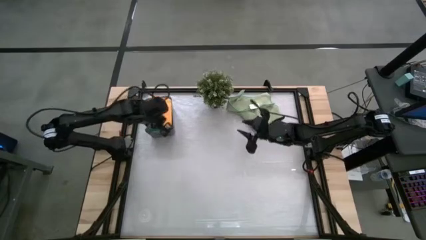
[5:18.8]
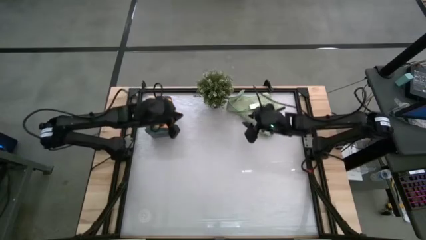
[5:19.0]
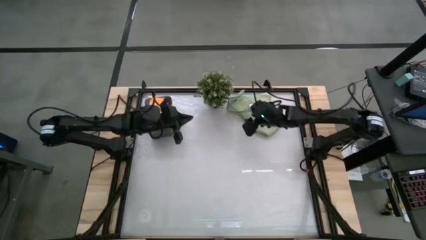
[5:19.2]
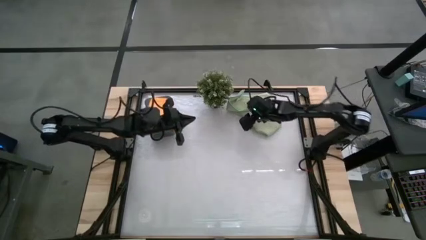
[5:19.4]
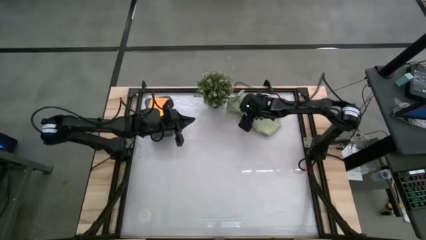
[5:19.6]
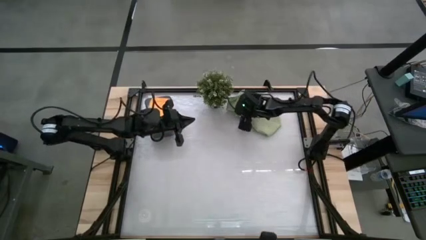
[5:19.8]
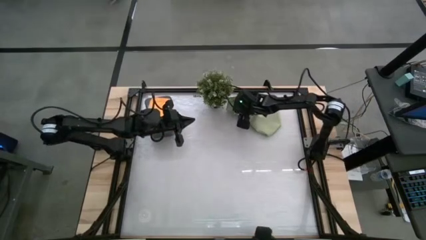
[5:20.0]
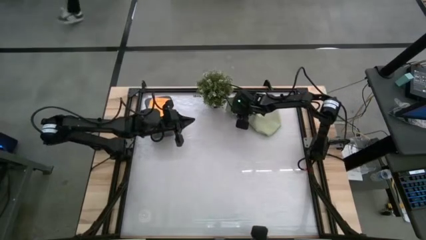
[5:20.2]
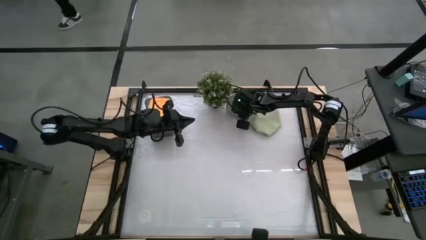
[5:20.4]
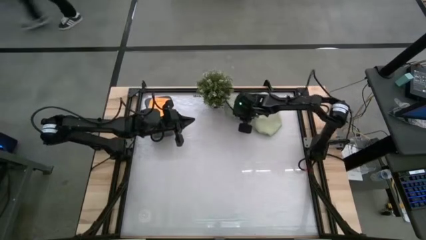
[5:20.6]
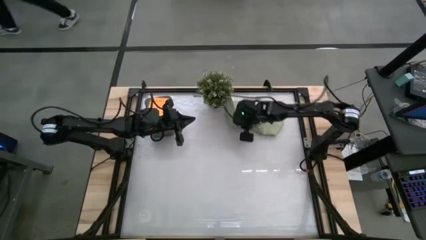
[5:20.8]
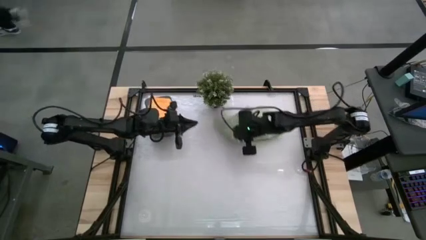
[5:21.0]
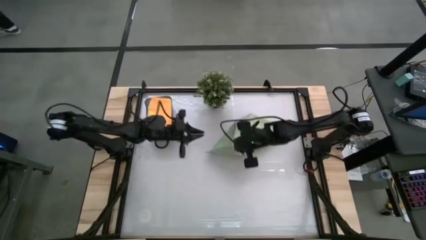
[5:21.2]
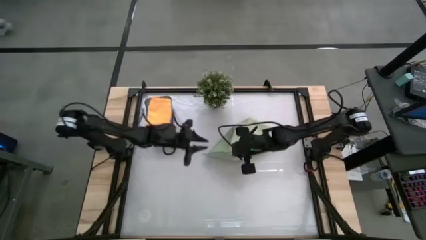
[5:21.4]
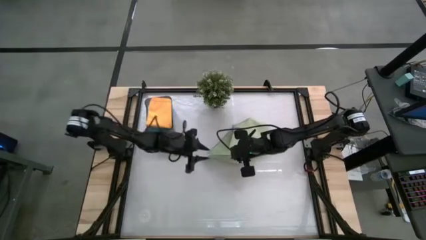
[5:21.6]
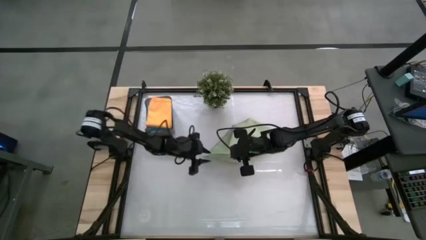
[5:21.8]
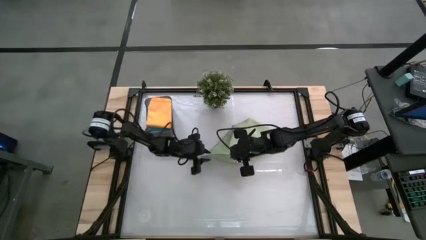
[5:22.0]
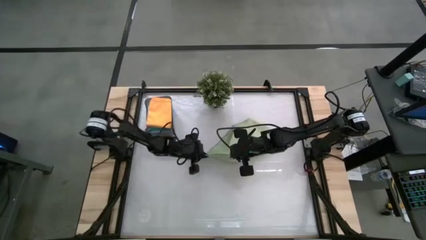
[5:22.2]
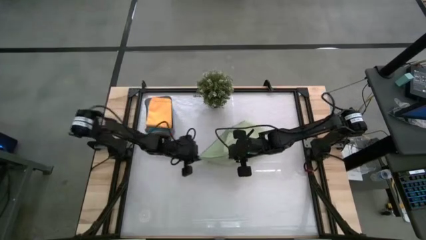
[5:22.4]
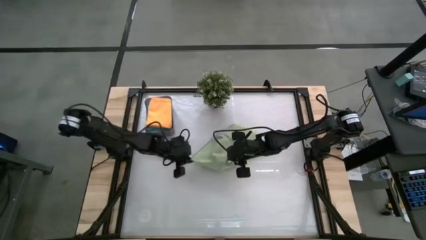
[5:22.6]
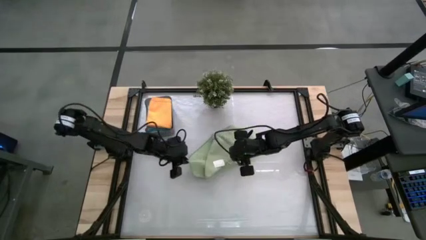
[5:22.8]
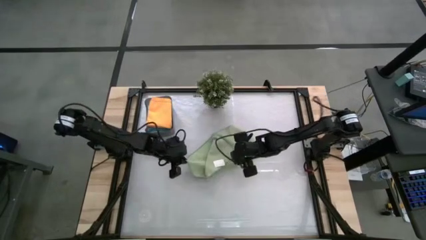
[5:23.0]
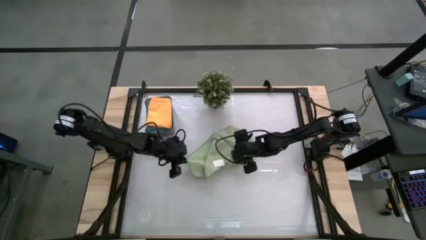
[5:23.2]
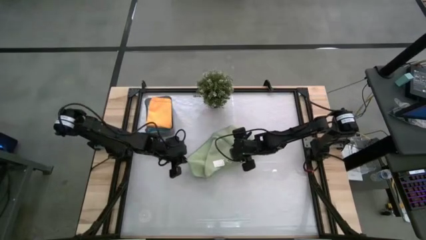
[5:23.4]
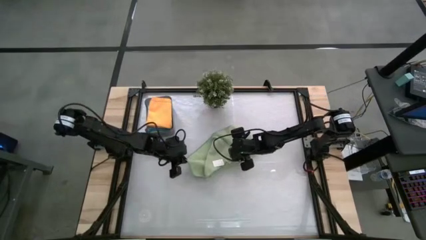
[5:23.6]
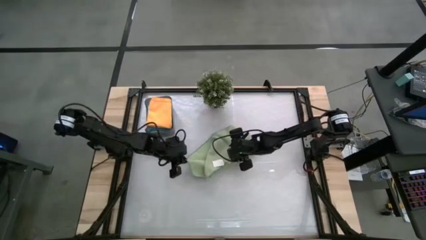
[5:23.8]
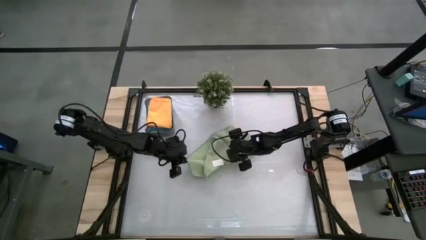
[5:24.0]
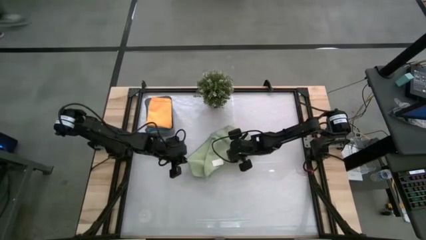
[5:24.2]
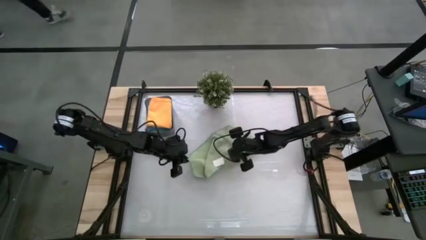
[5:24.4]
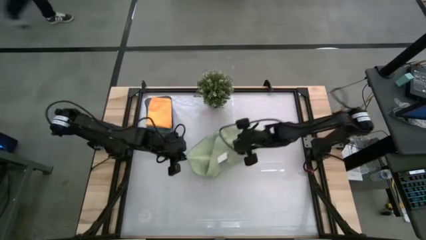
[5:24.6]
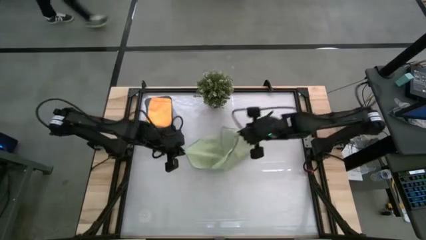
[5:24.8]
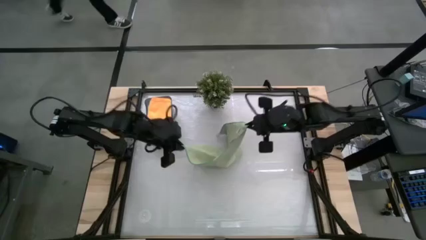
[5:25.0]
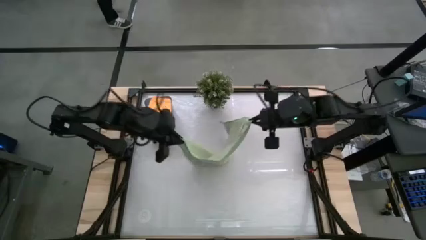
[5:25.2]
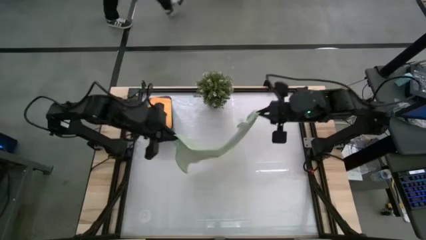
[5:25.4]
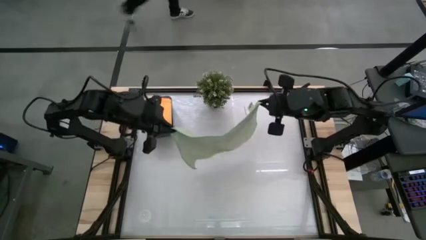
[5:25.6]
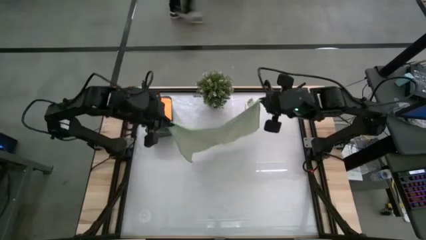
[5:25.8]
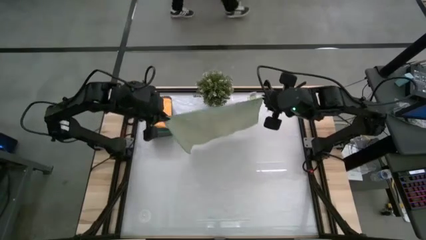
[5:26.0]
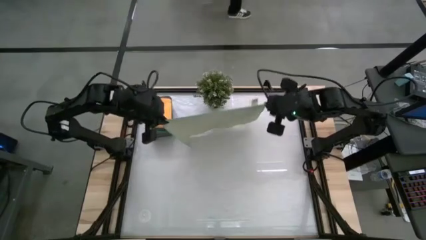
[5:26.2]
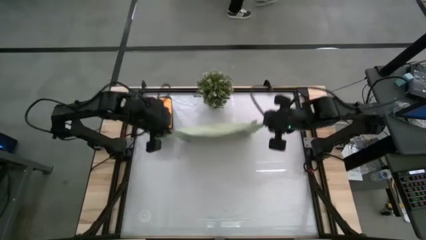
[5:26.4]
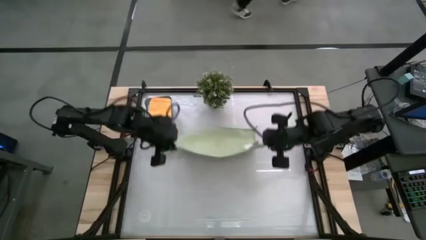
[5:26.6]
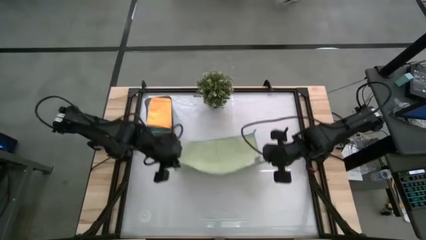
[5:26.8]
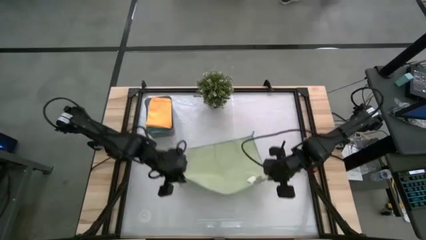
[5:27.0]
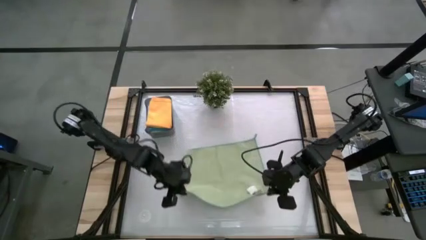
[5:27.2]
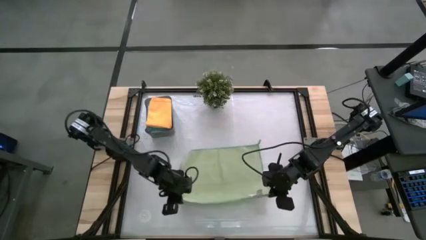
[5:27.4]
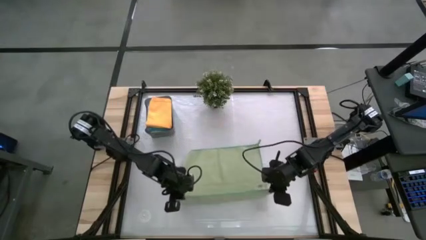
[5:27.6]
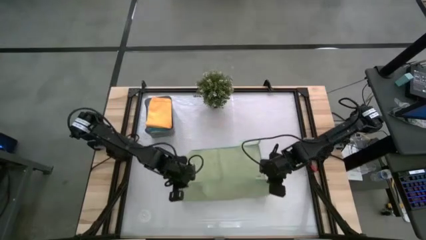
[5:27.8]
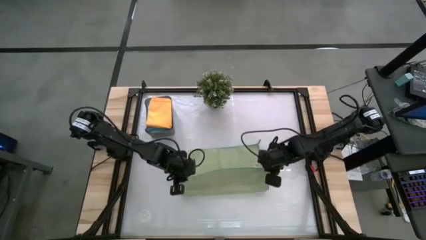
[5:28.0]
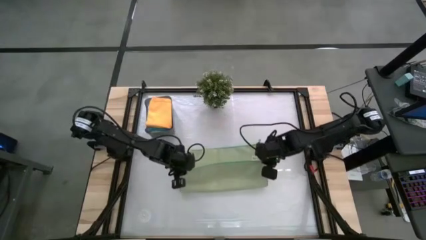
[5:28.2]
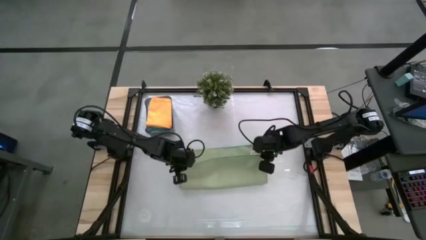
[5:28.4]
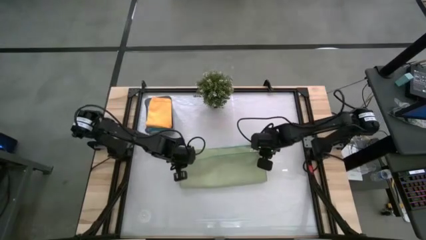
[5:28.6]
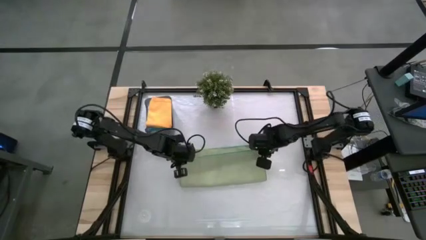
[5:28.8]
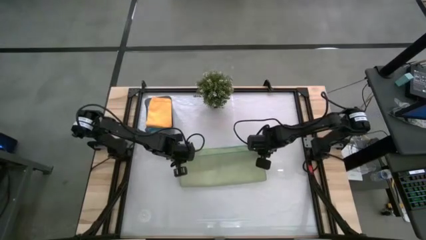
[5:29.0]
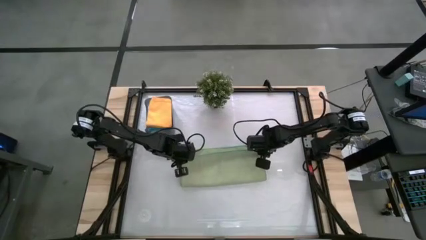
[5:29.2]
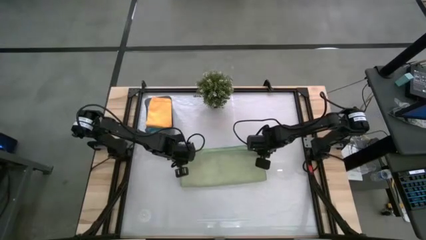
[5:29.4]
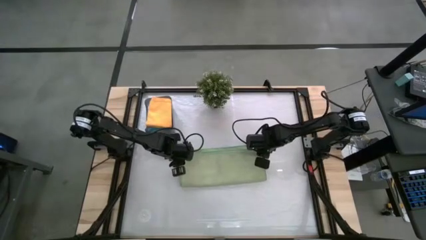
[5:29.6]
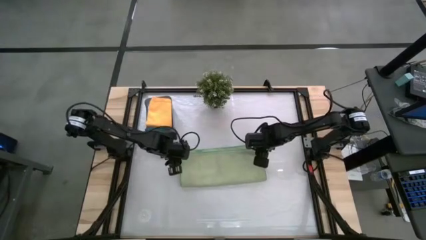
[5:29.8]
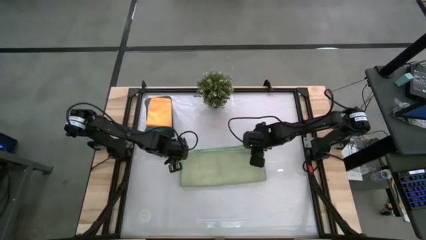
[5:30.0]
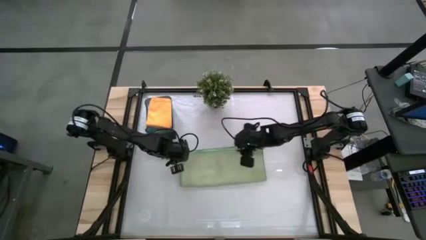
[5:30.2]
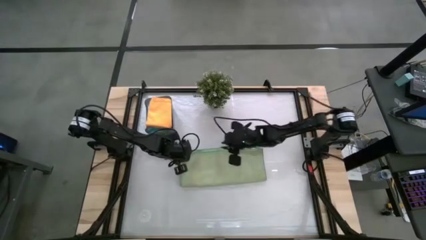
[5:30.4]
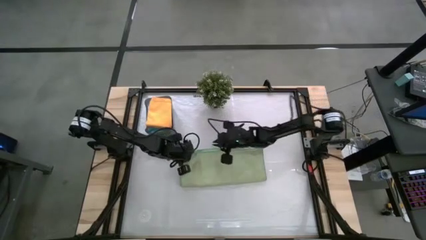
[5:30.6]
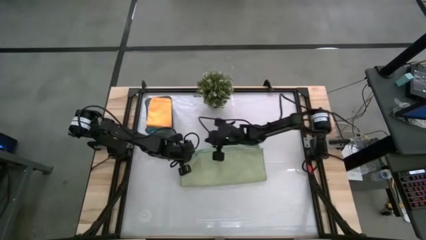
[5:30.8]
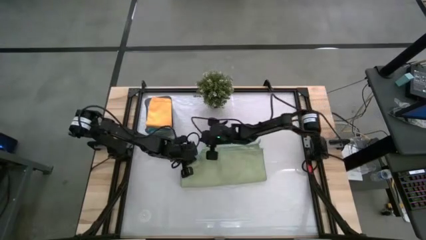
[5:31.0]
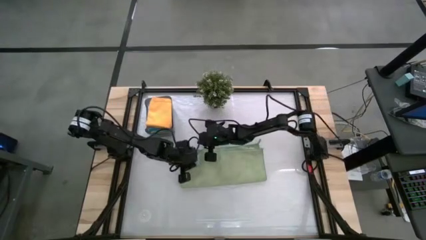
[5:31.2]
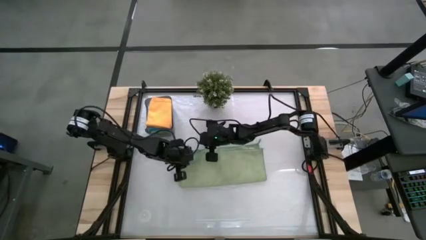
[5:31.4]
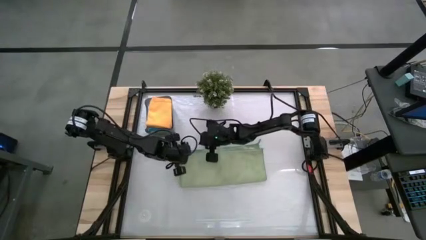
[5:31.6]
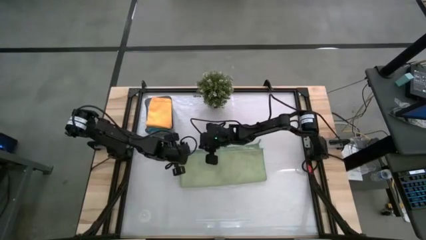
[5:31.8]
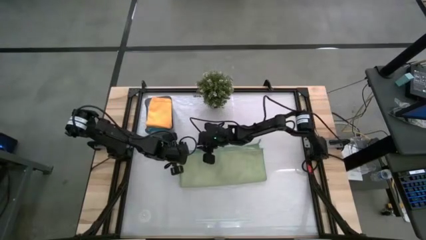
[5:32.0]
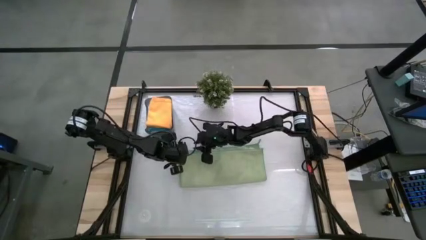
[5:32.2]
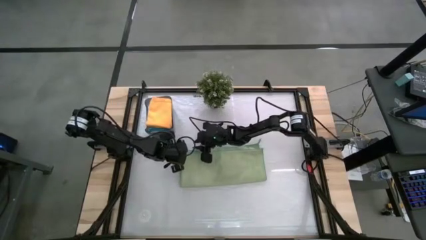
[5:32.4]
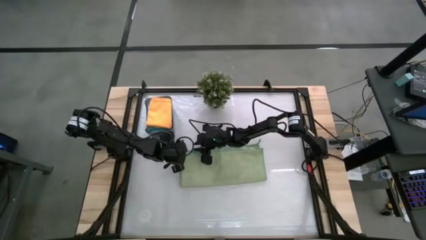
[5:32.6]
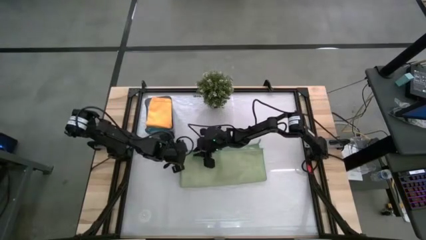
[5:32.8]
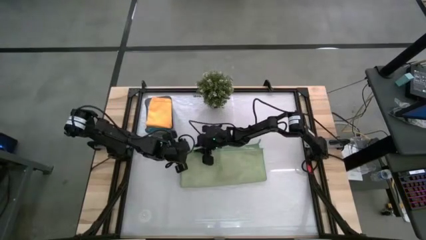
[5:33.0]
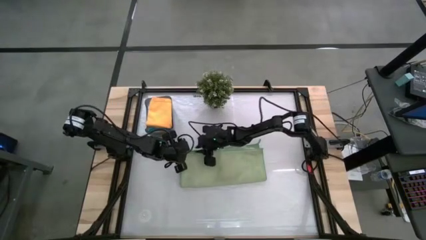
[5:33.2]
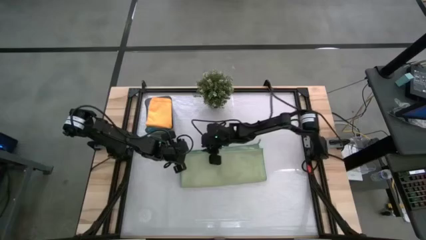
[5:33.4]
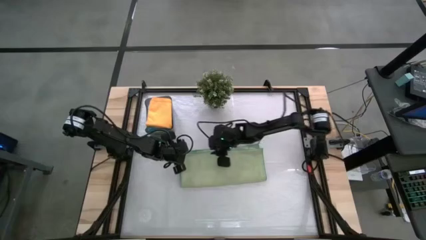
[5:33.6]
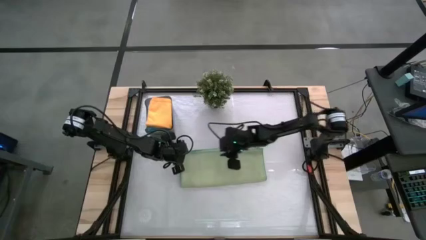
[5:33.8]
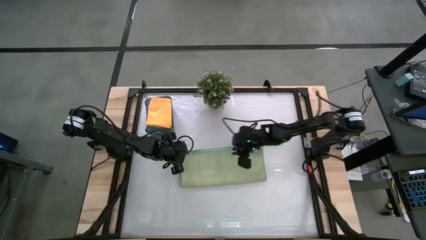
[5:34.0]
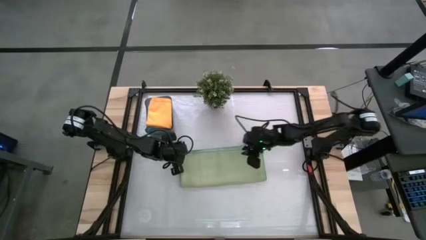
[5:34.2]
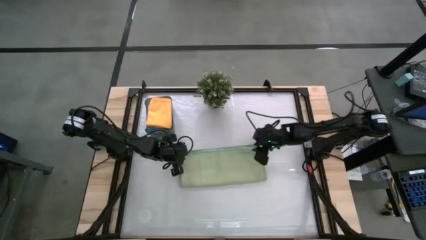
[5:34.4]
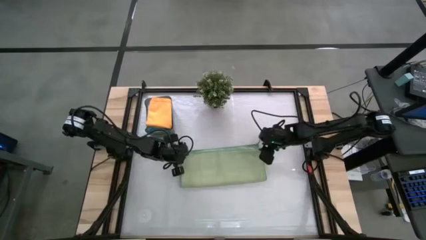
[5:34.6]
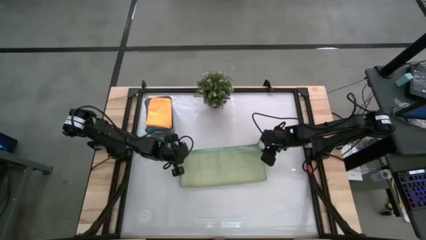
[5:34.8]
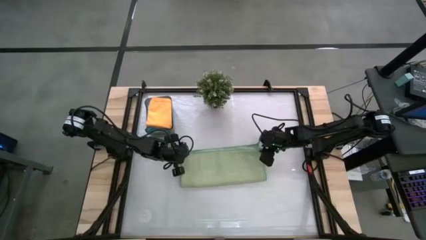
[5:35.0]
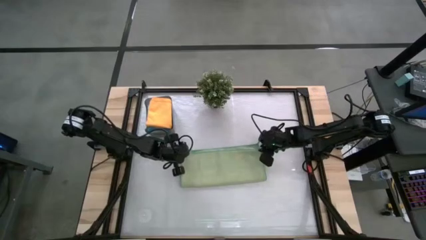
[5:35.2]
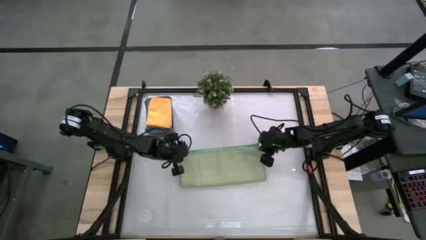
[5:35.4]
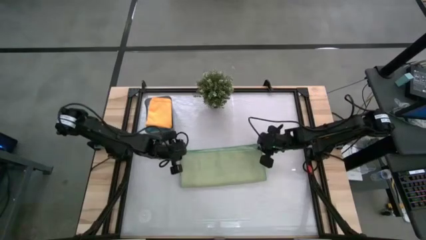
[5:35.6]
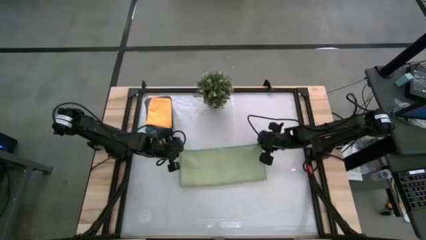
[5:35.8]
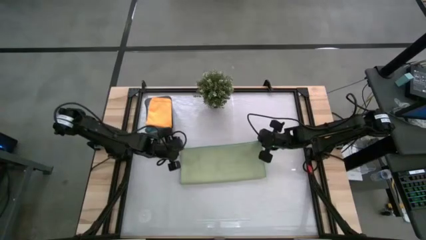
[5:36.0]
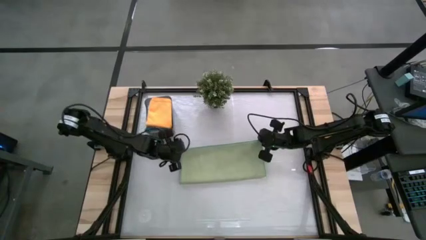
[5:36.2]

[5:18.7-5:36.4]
Task: Fold microfiber towels
Fold the green microfiber cloth
